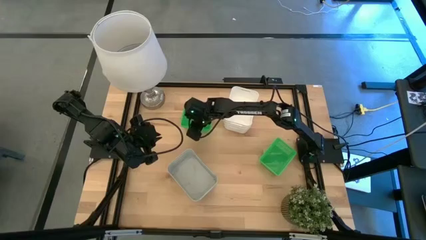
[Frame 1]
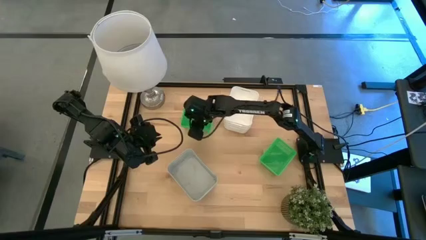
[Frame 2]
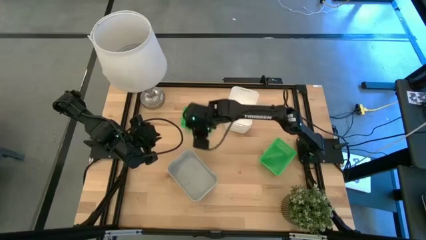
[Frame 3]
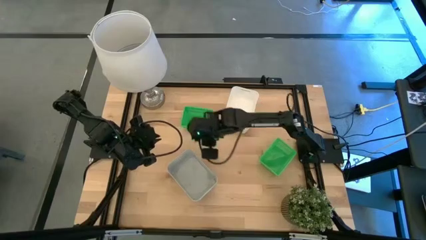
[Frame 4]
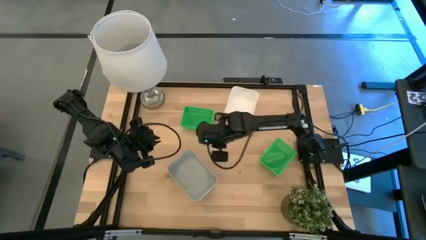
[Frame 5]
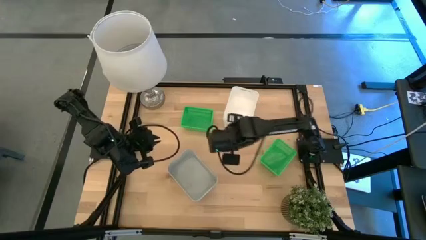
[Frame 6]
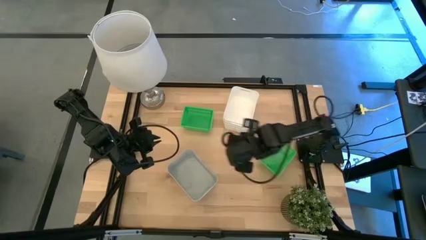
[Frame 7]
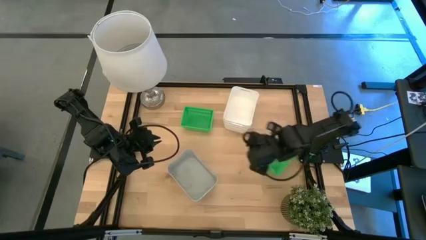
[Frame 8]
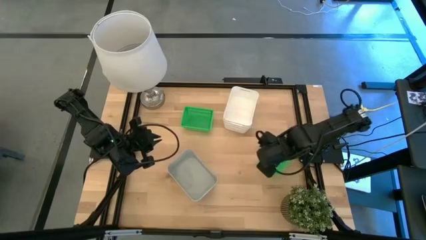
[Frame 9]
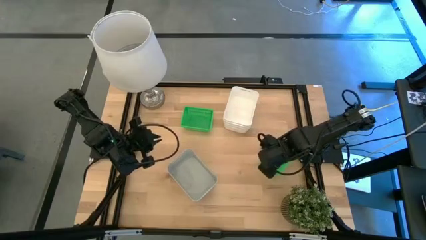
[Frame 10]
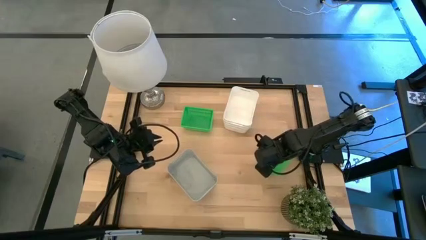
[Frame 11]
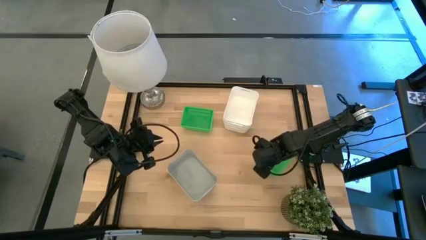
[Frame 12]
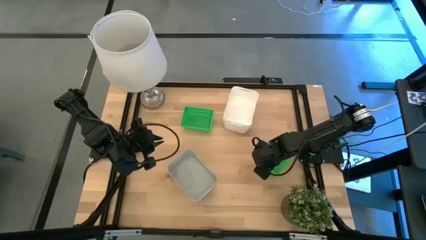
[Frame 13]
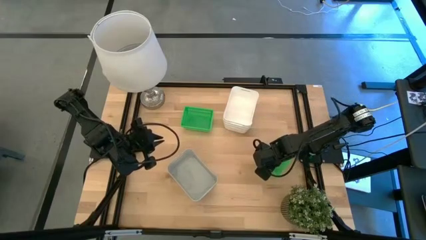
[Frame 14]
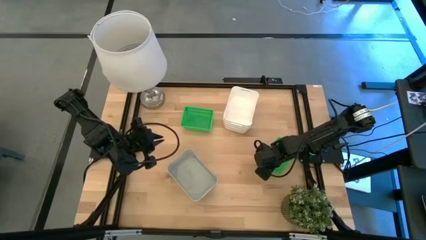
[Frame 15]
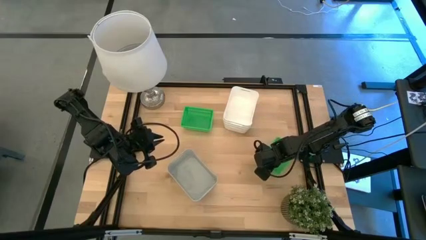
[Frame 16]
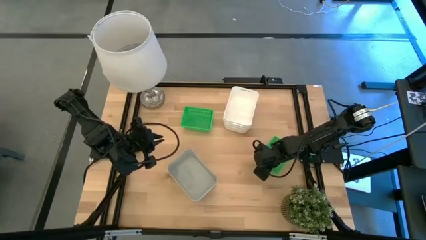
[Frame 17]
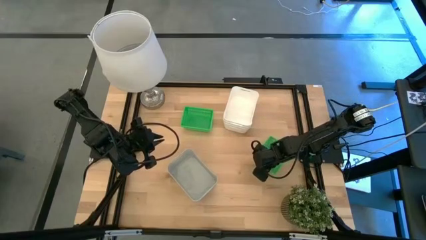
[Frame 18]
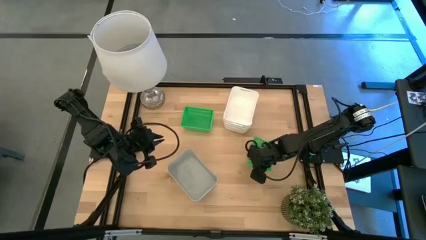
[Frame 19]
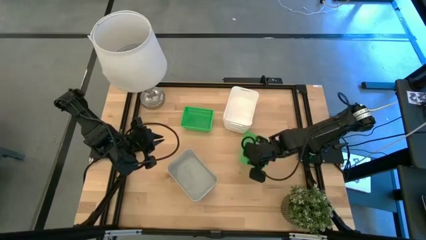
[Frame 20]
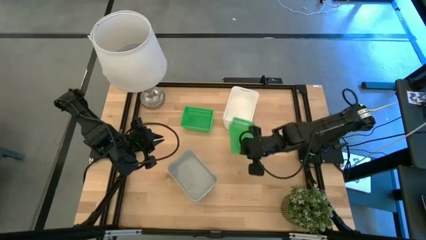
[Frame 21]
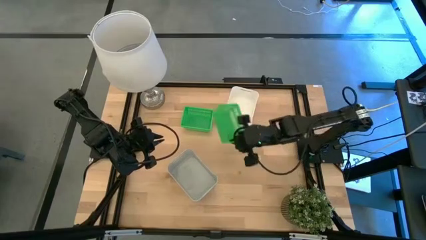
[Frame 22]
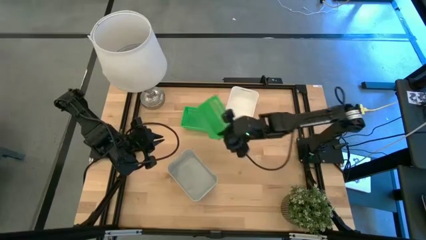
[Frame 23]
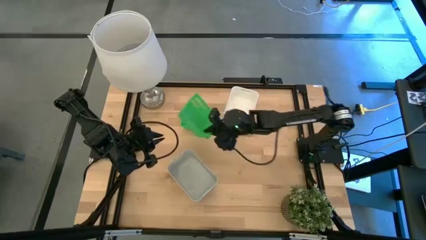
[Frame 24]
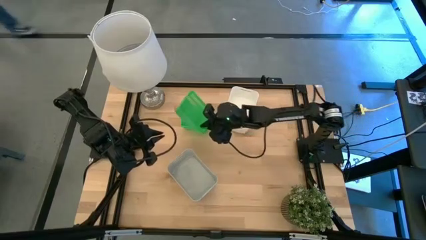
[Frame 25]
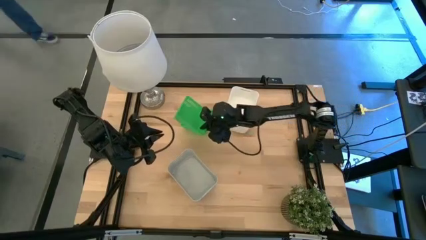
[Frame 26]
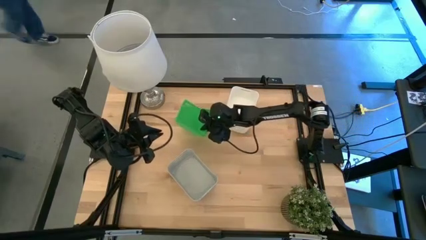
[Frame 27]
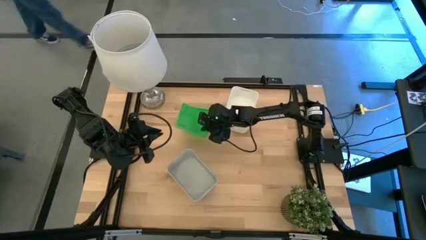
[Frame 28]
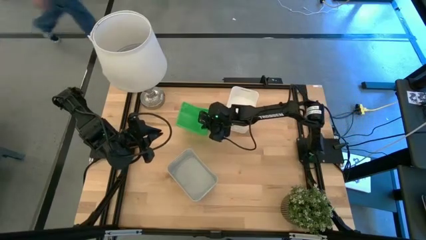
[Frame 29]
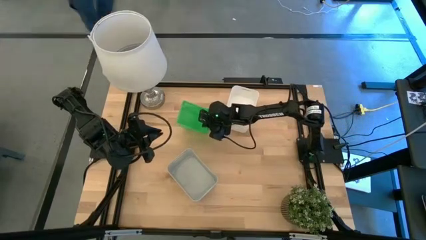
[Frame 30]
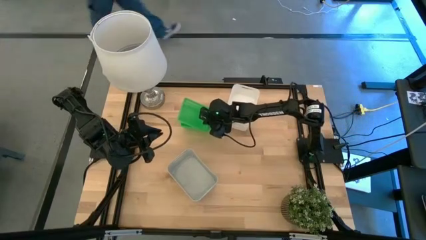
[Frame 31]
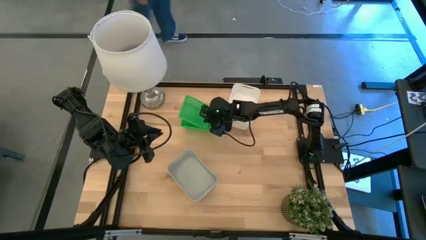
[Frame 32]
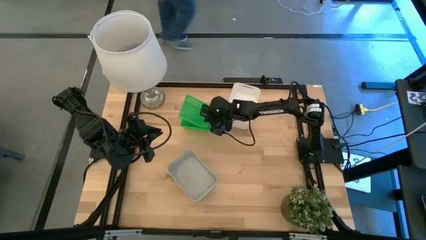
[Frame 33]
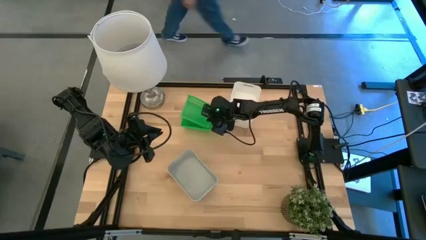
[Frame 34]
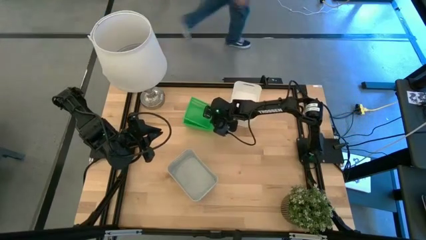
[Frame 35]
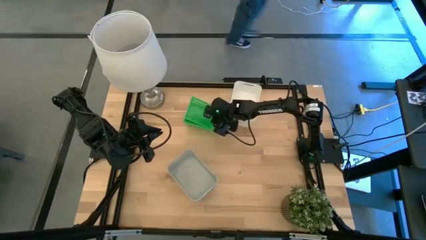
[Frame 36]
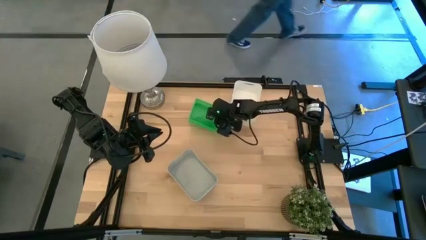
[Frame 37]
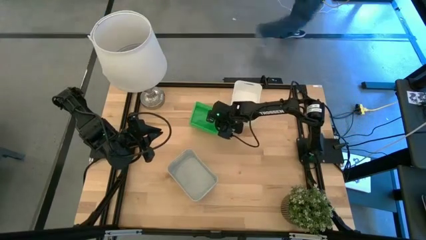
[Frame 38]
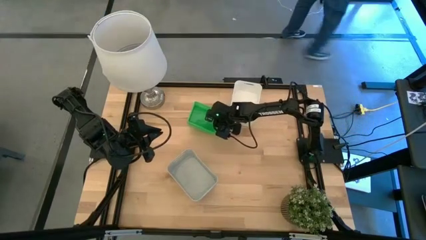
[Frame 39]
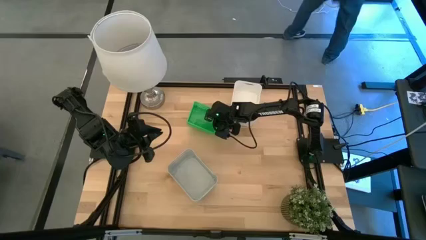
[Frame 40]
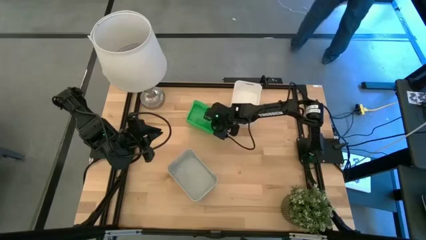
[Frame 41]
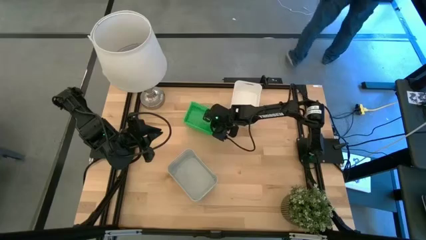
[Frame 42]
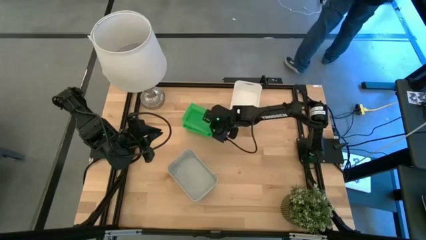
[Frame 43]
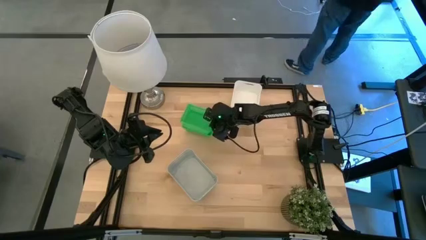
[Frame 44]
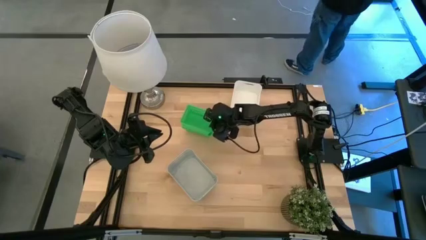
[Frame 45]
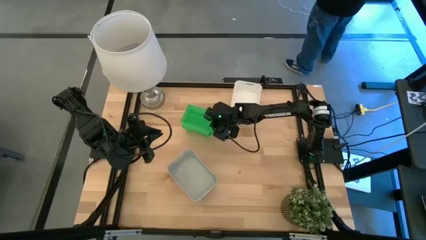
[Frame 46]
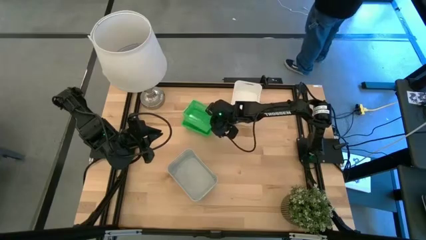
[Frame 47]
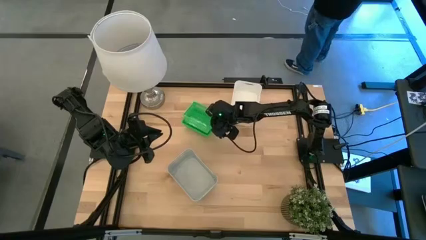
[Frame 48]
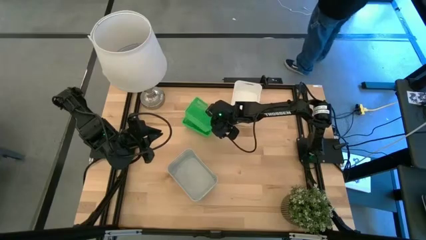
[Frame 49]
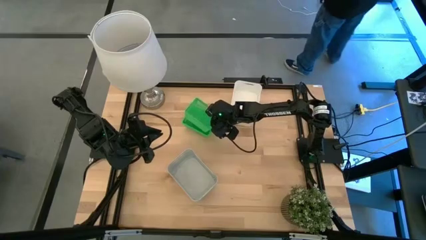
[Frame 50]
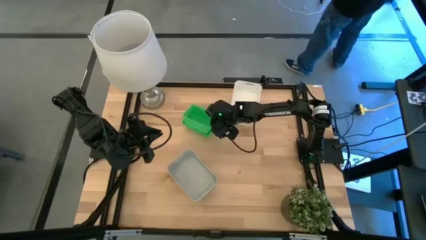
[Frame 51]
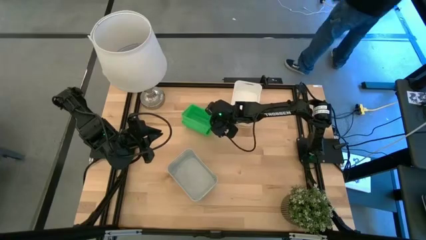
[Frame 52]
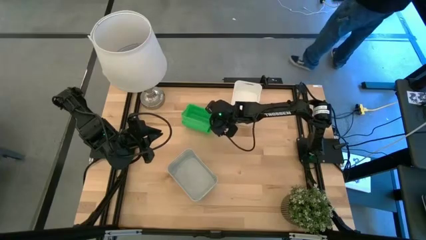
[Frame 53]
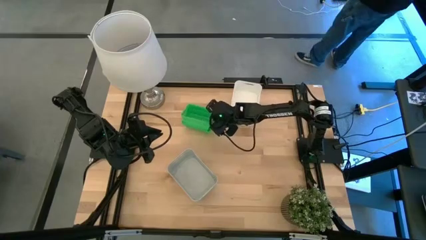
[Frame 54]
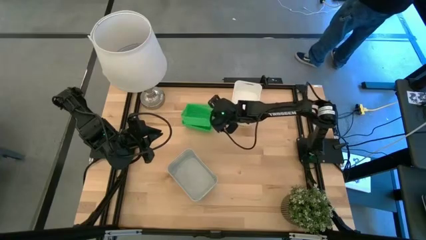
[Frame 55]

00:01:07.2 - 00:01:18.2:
Stack the right green bin on top of the left green bin
